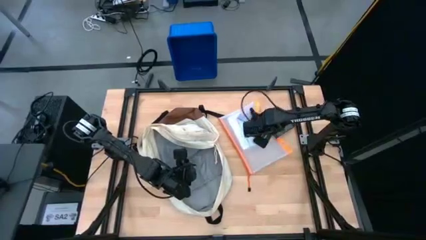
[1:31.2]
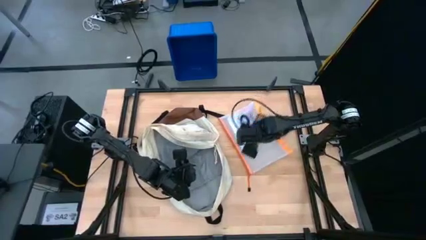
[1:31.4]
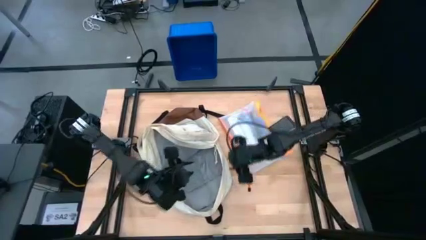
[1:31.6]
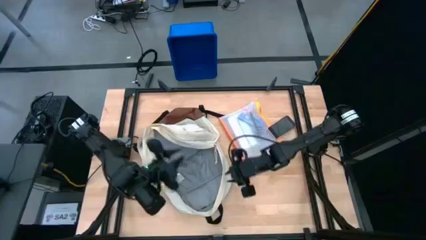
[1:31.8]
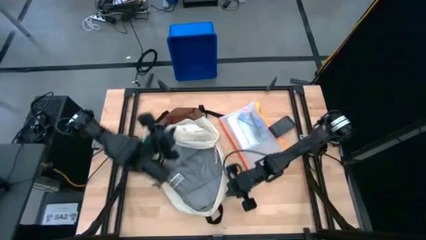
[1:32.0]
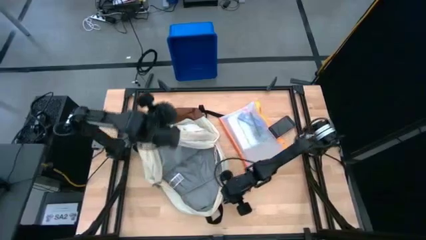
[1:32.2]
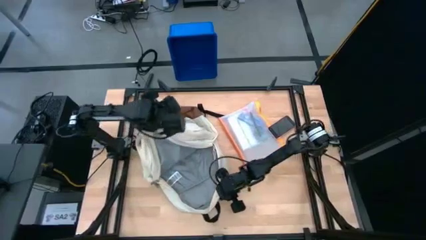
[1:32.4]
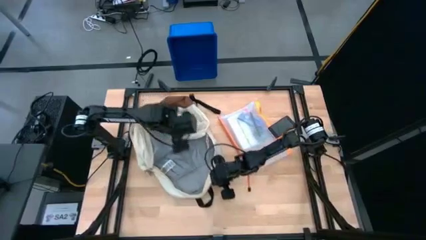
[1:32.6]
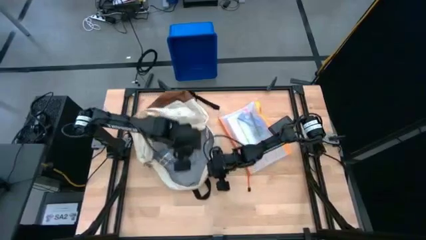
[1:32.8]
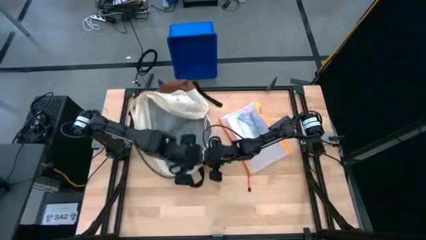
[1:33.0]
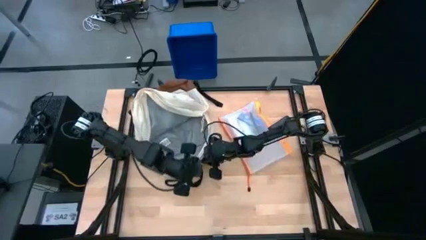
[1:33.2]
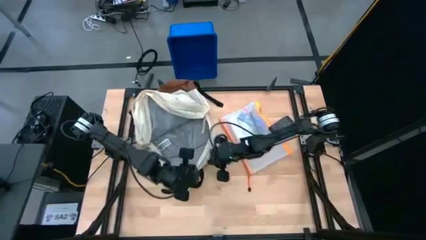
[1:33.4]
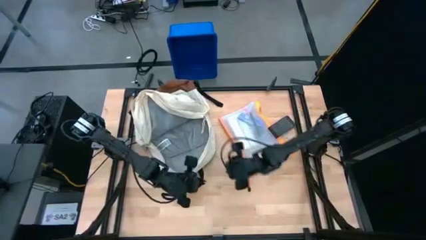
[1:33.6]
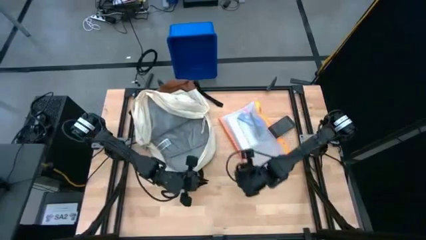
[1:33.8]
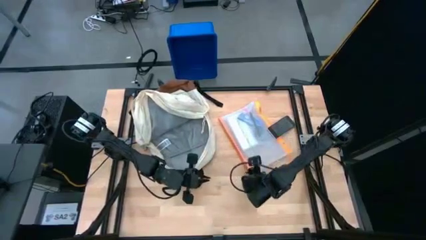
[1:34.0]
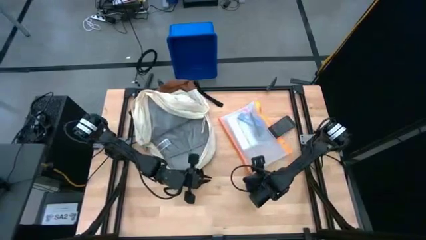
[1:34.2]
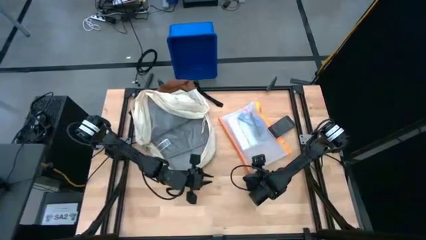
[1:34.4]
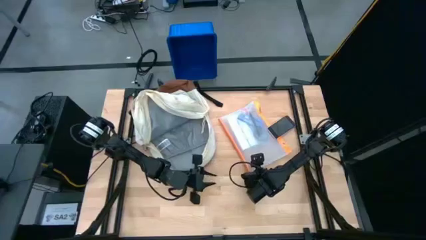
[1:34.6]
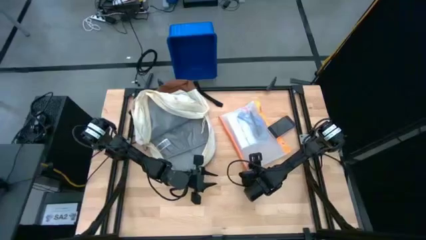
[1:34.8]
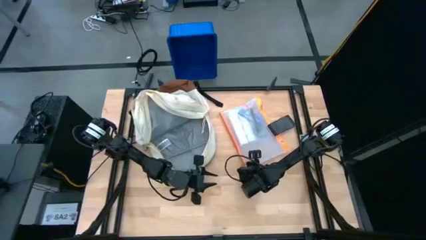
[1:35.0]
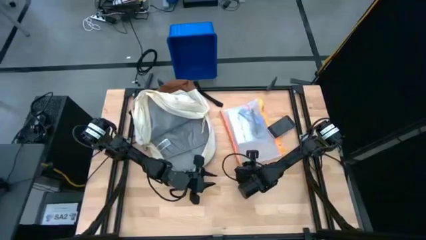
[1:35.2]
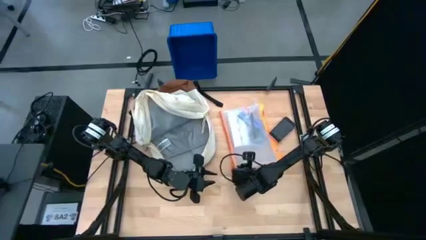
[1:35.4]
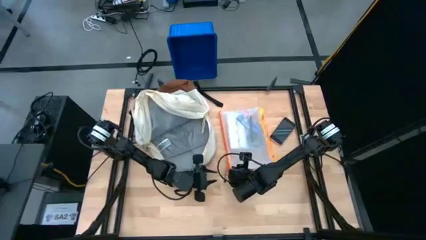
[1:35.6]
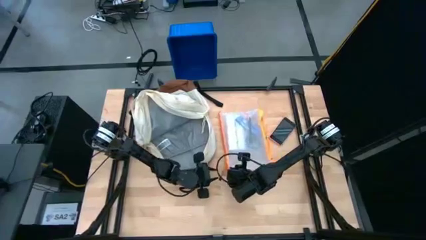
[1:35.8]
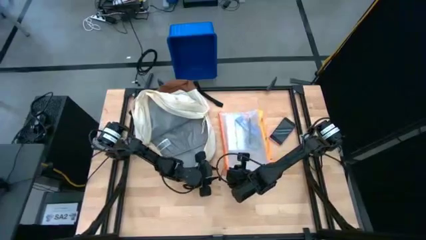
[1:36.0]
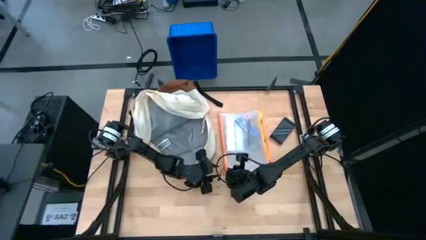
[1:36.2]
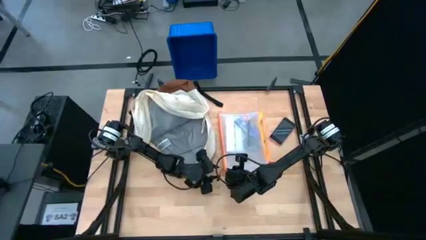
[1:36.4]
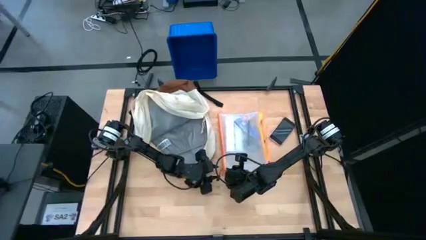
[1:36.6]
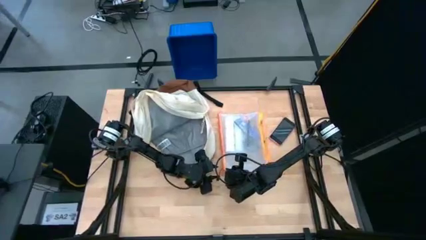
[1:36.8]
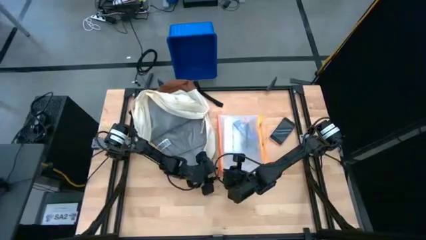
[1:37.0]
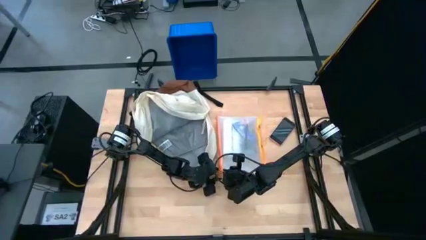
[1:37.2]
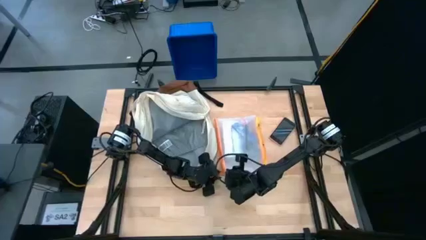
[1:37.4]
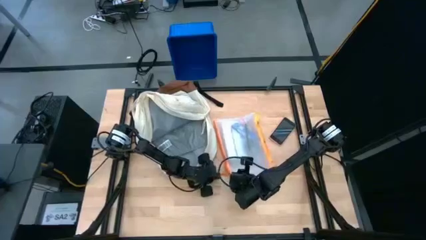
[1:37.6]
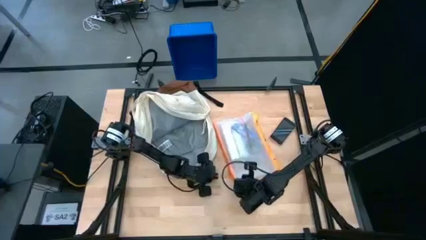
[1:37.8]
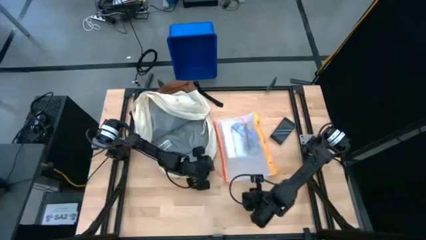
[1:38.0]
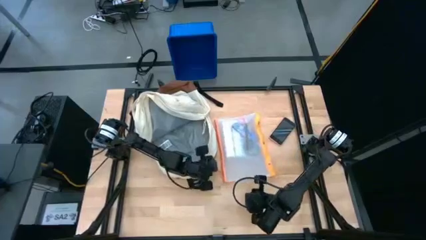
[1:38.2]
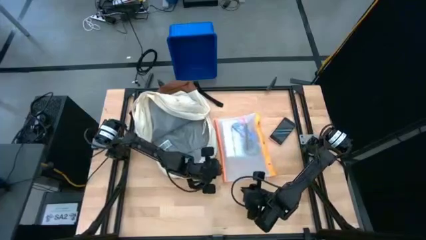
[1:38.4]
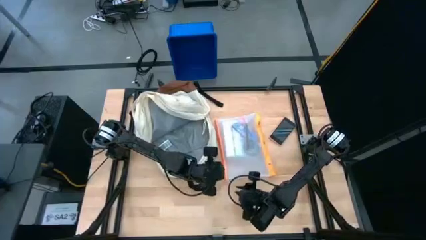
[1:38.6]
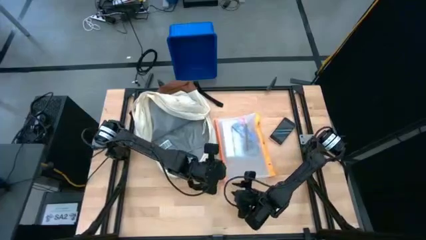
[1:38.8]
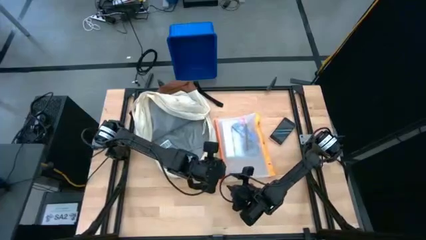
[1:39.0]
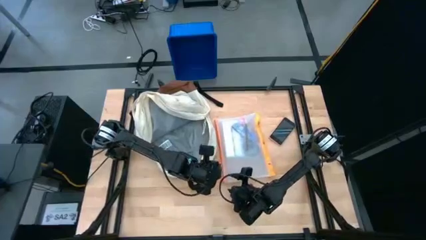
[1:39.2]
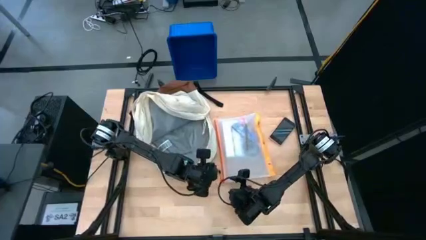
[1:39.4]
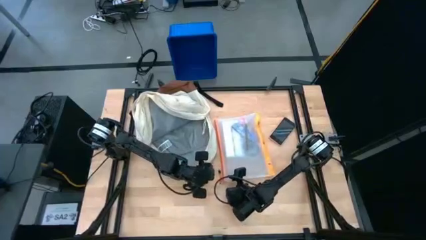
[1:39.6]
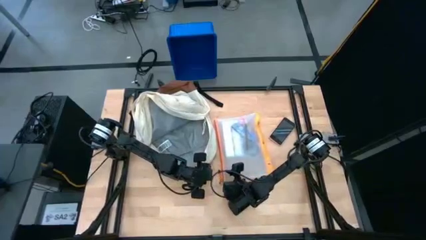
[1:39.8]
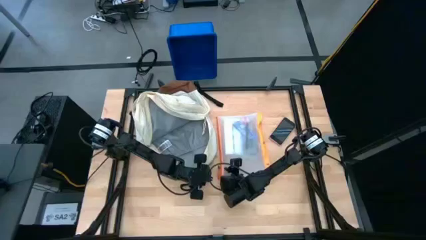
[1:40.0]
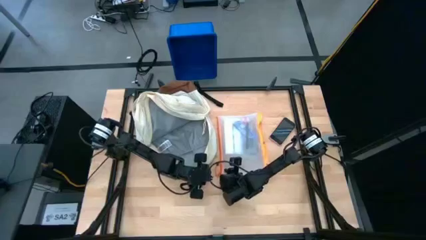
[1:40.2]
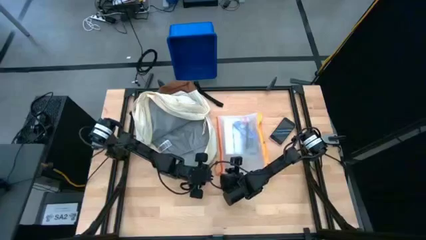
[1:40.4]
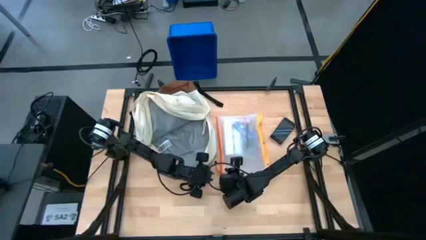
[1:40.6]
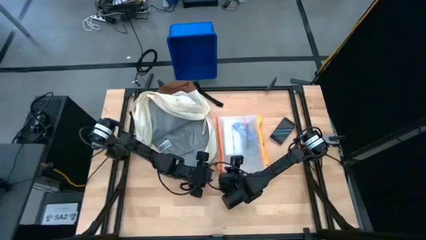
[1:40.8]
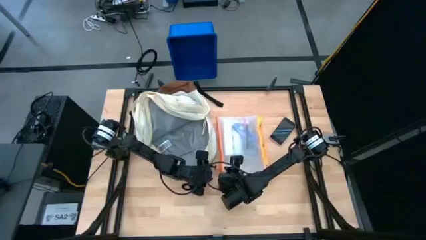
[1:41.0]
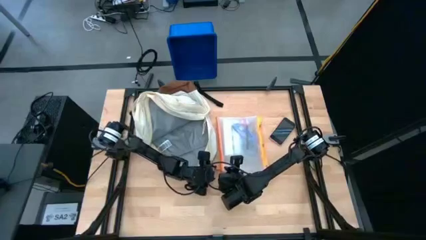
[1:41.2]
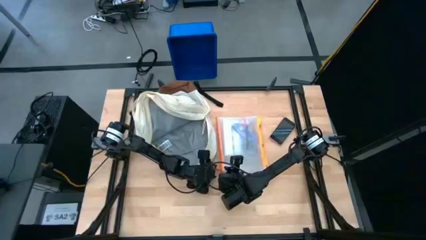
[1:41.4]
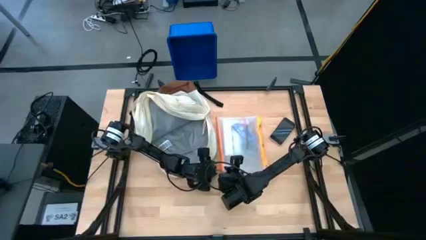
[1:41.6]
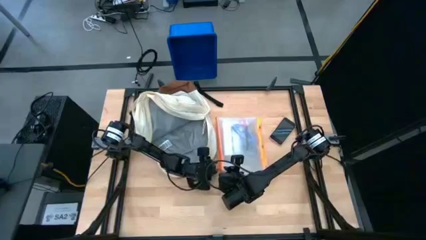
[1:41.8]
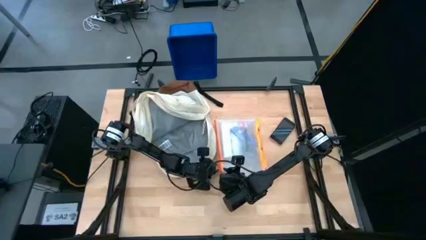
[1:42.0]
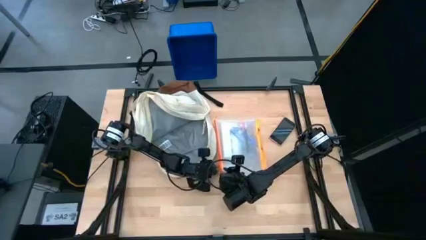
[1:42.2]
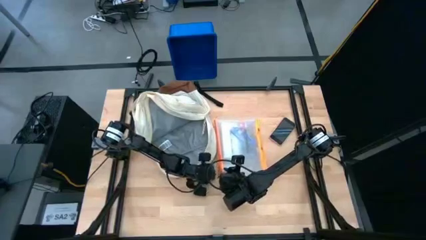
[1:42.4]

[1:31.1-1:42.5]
Task: Unpack backpack
Open the zip bag

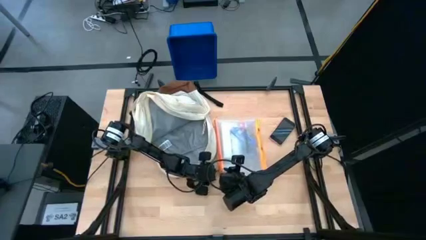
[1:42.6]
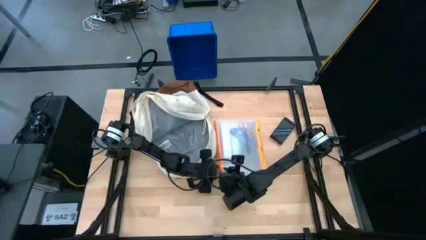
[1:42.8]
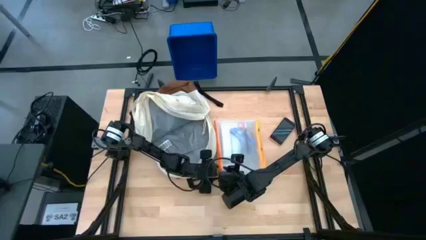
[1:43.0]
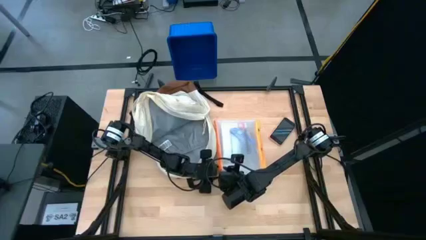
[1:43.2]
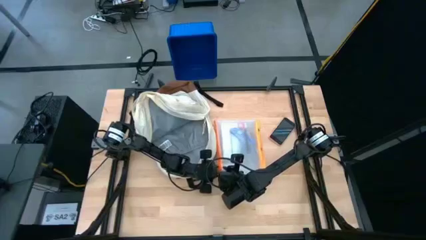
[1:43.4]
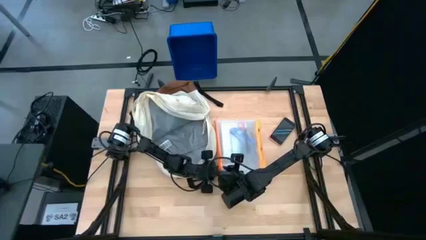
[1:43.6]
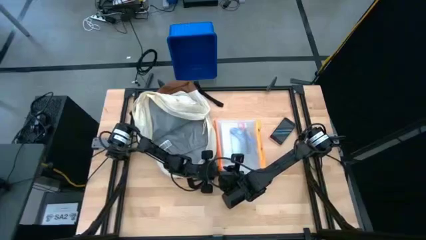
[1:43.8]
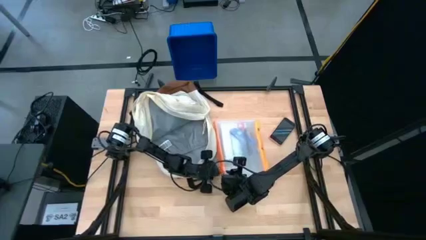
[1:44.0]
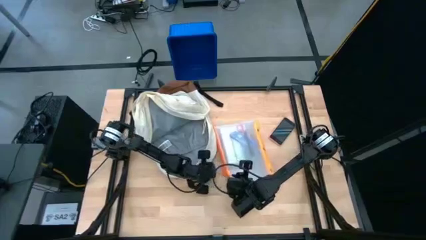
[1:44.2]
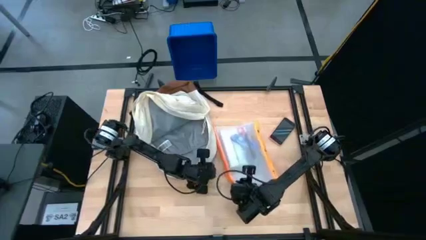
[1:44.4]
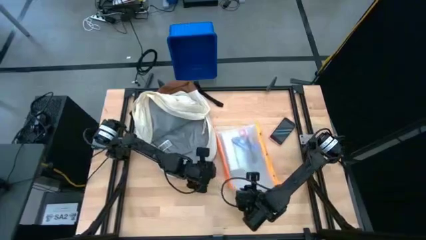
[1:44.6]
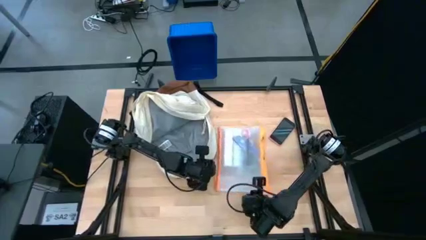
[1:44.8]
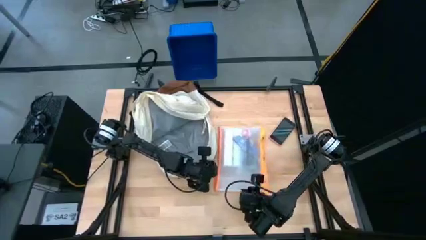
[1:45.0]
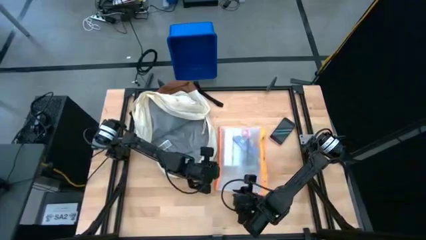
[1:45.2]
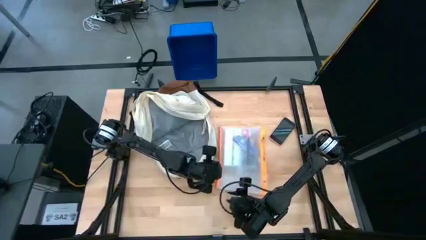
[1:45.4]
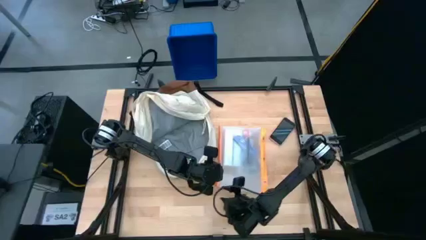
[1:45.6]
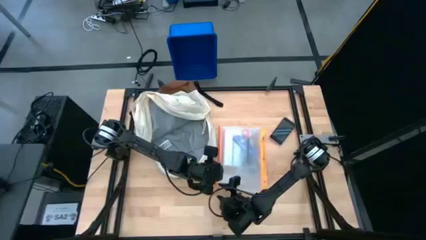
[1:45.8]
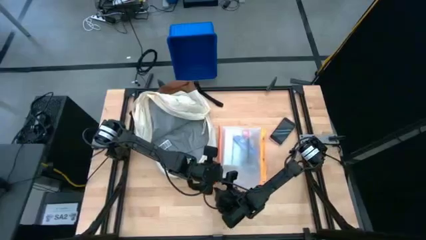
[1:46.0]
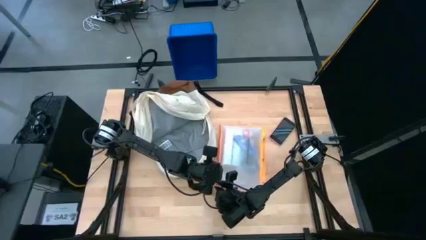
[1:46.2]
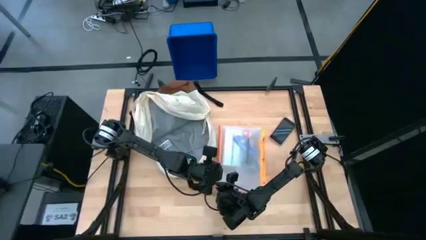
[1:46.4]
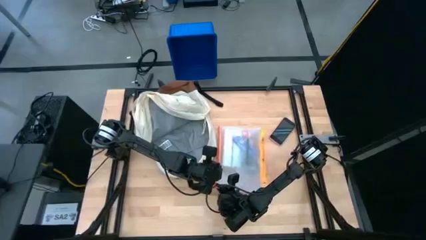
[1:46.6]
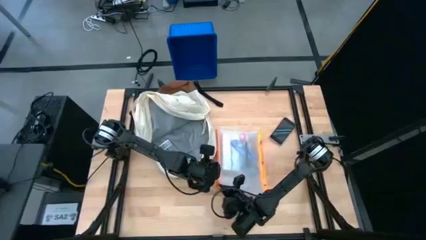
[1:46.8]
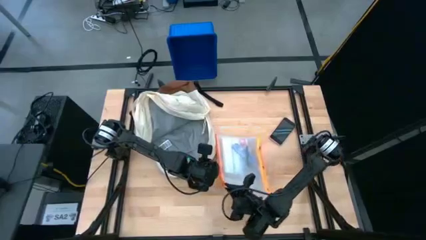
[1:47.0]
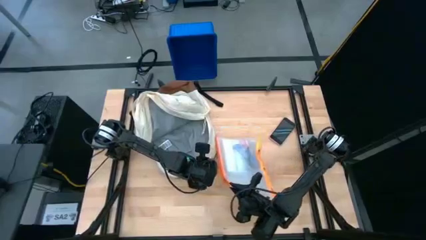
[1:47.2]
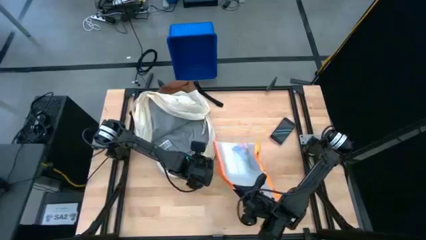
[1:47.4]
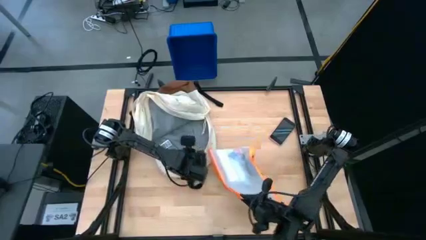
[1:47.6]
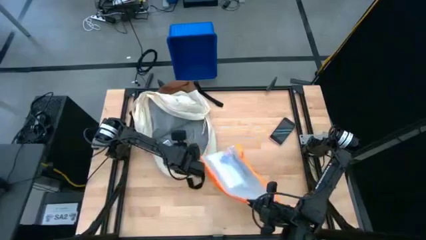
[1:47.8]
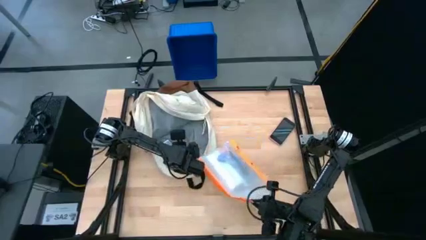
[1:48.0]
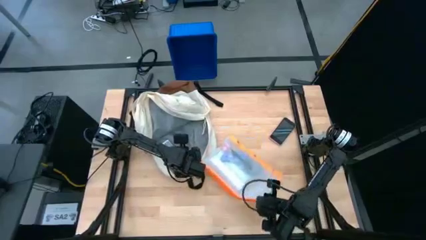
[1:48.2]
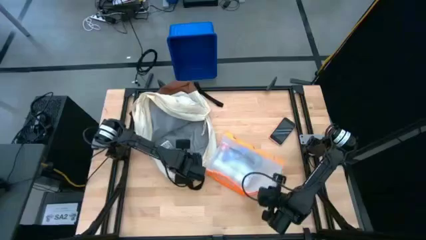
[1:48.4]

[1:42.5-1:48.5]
Open the zip bag
